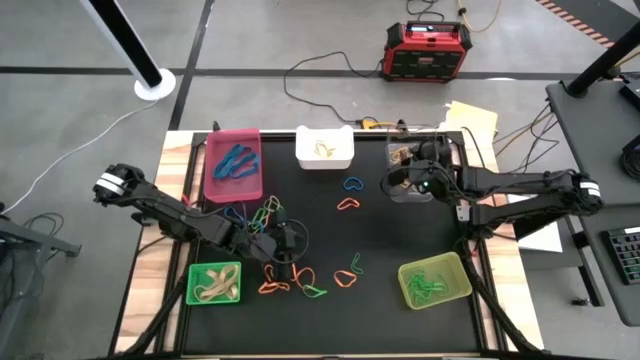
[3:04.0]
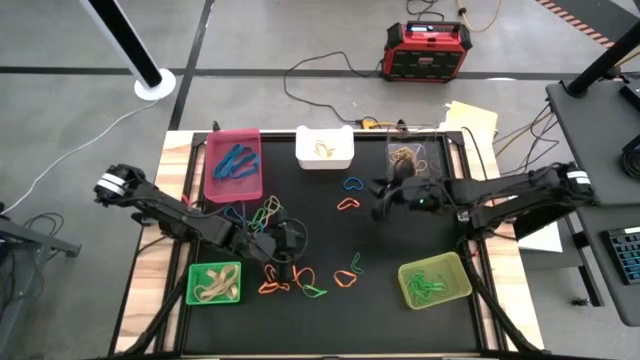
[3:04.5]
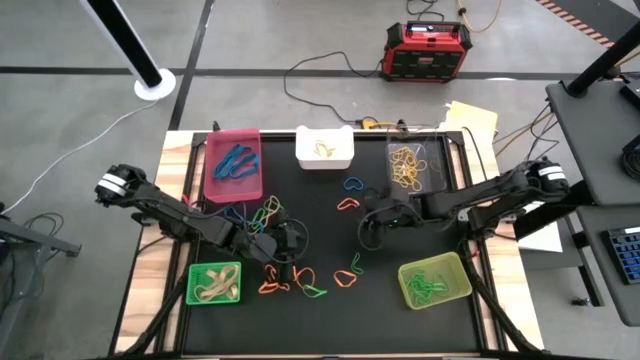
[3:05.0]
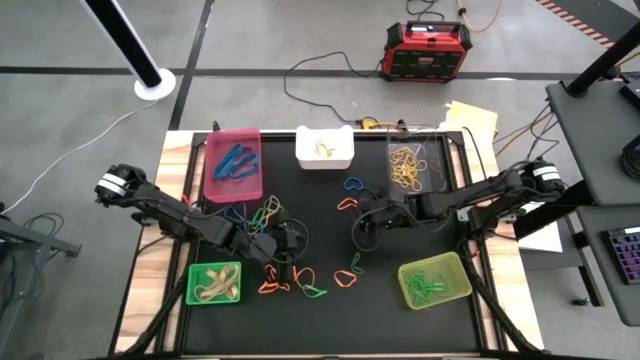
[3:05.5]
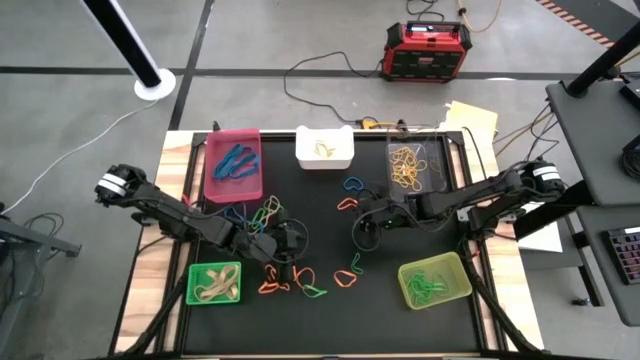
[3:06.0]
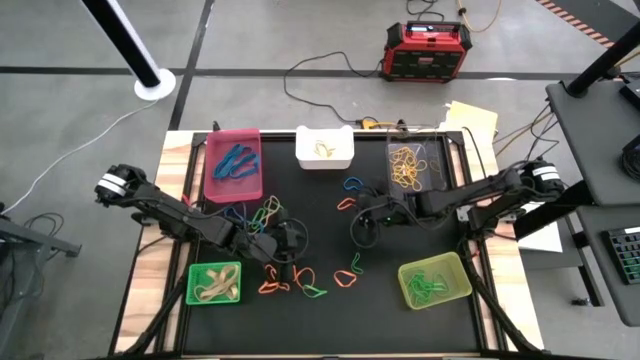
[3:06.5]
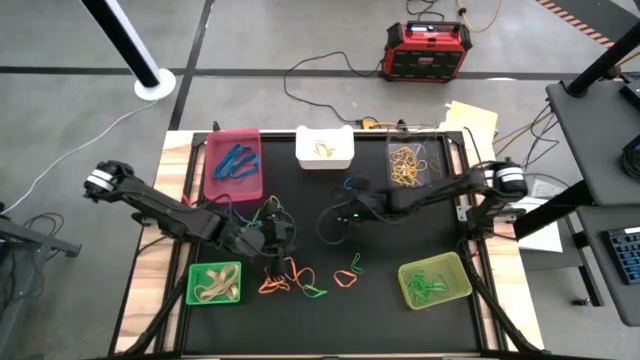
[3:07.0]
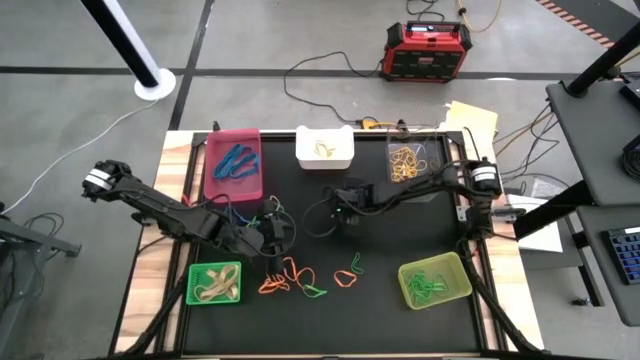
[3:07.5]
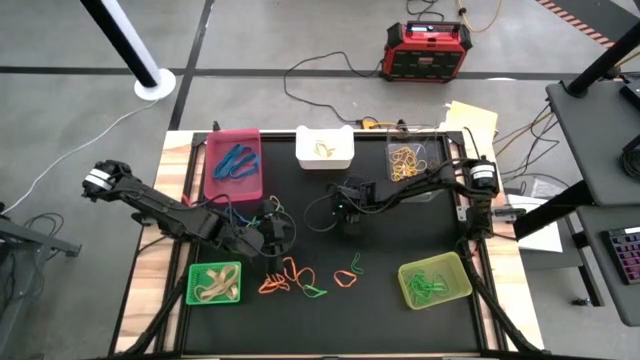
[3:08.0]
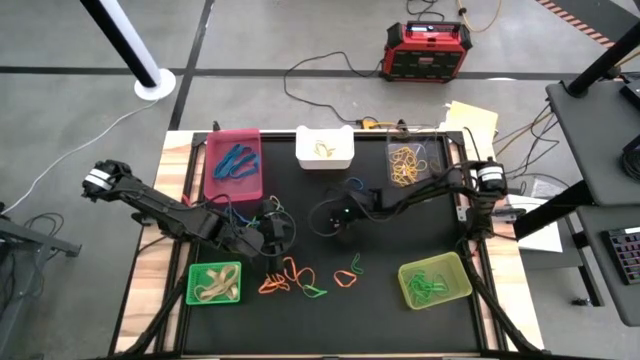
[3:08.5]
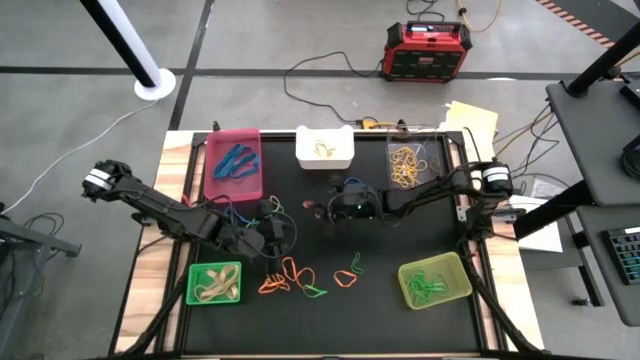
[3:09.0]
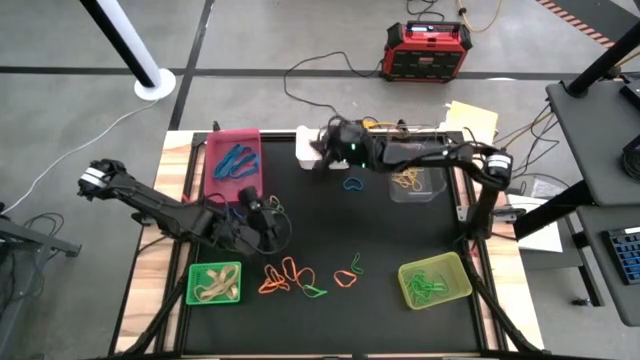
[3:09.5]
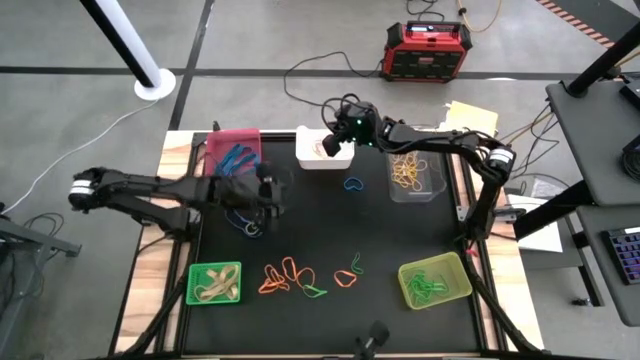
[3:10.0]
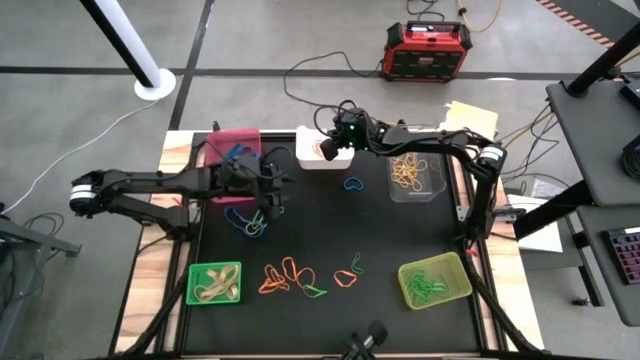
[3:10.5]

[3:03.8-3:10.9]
Task: Sort rubber bands into baskets
Put the orange rubber band into the white bin

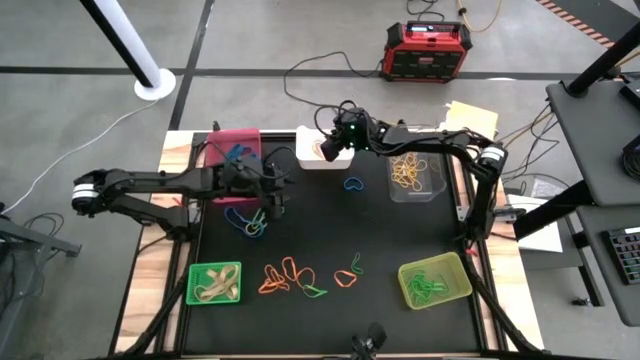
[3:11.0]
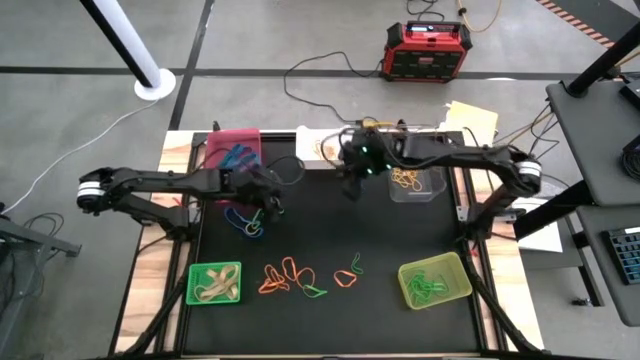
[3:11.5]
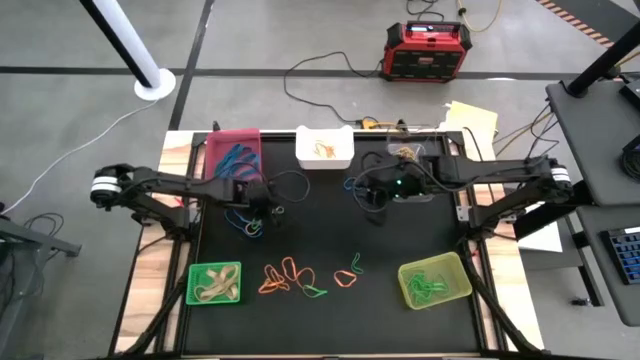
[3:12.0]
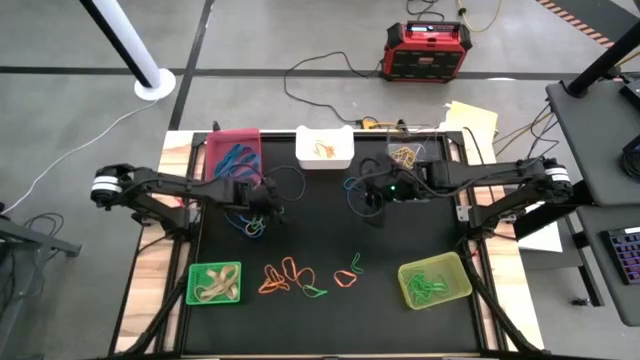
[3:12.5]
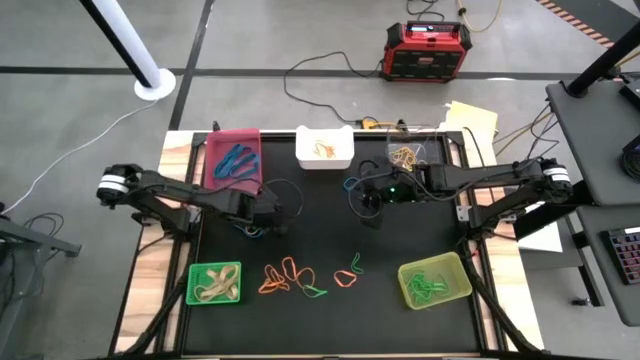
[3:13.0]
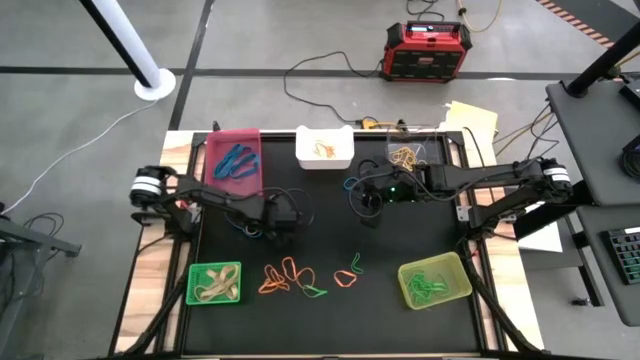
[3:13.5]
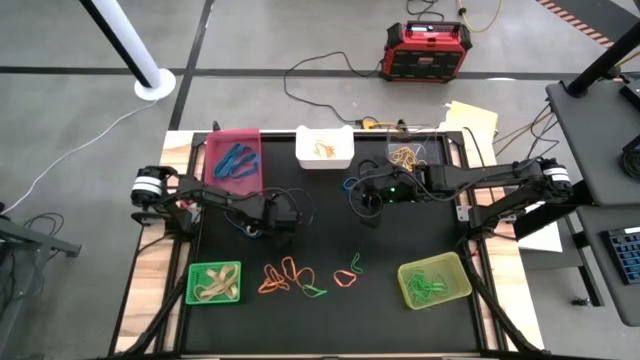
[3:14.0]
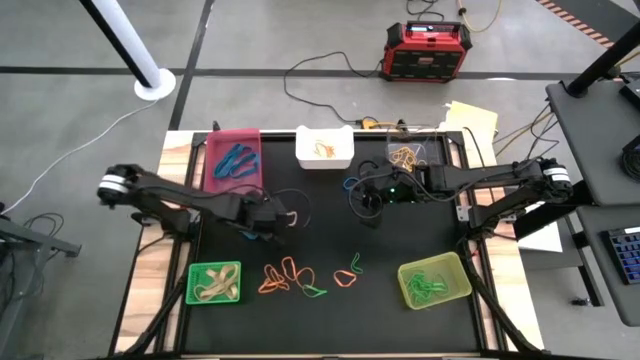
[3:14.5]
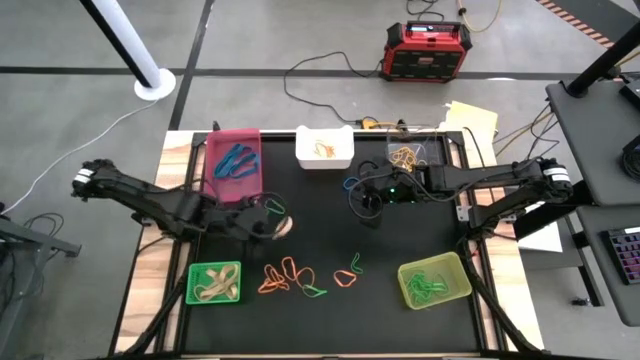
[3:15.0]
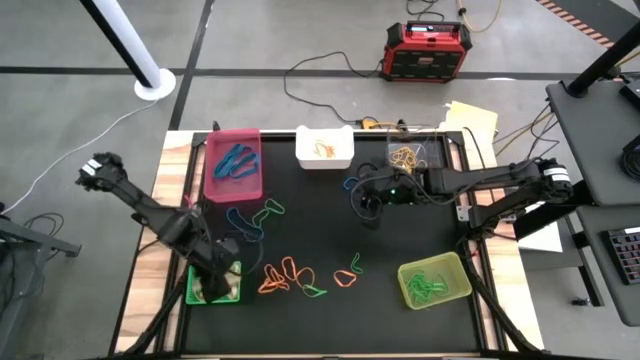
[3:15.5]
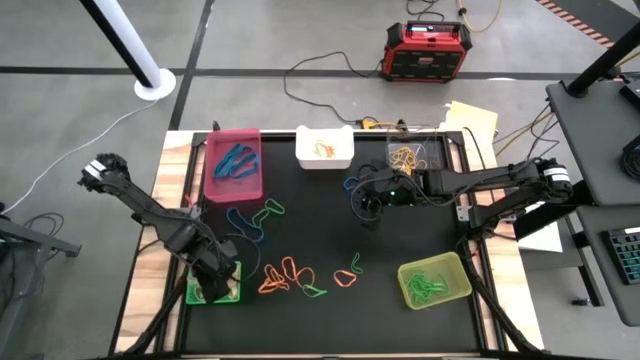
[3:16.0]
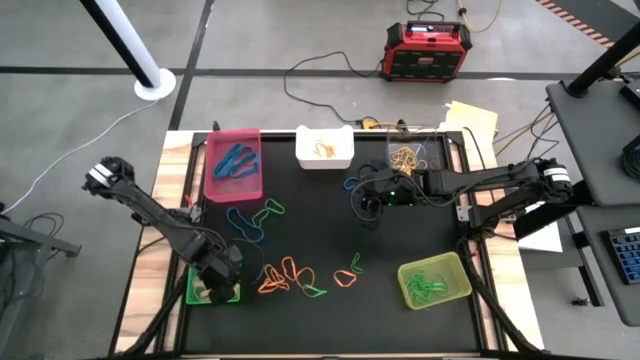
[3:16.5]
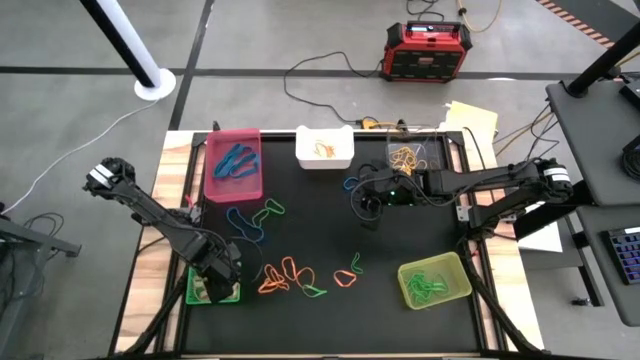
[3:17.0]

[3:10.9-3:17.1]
Put the light yellow rubber band into the green bin

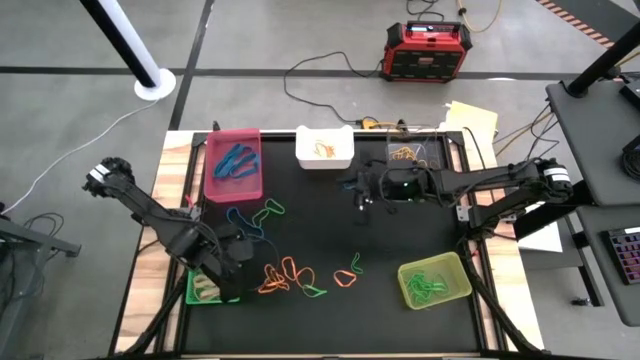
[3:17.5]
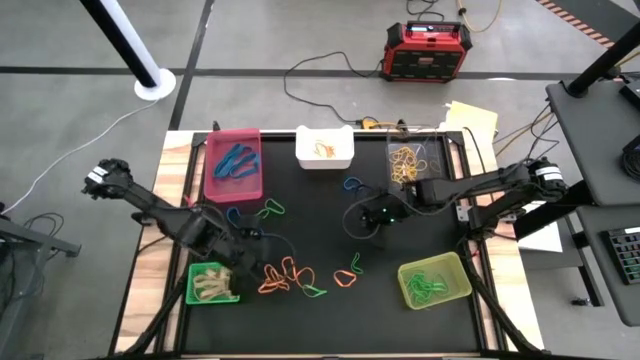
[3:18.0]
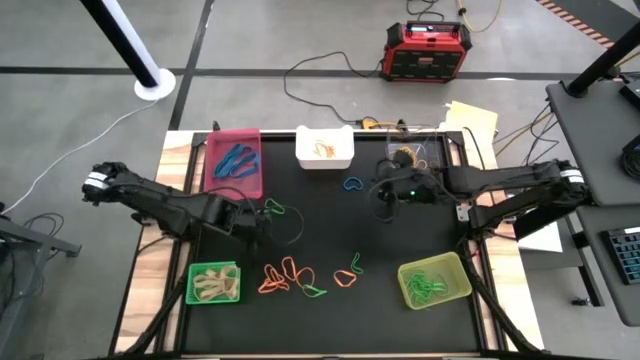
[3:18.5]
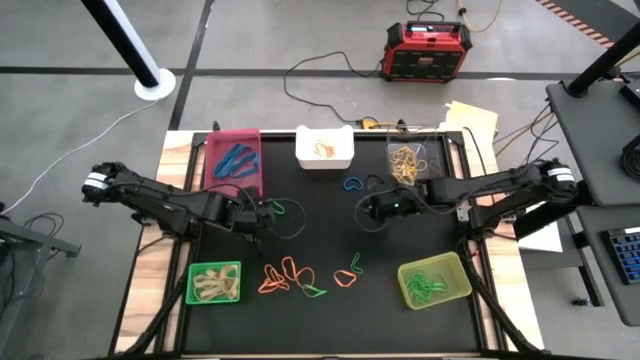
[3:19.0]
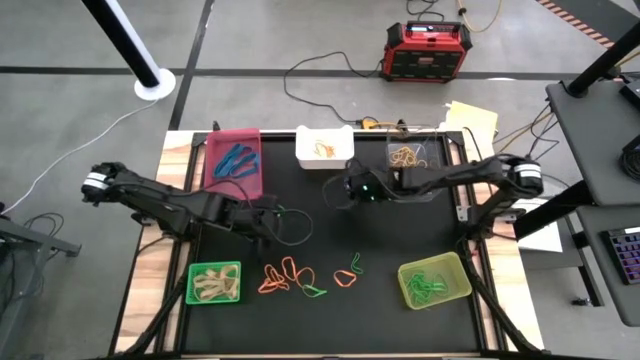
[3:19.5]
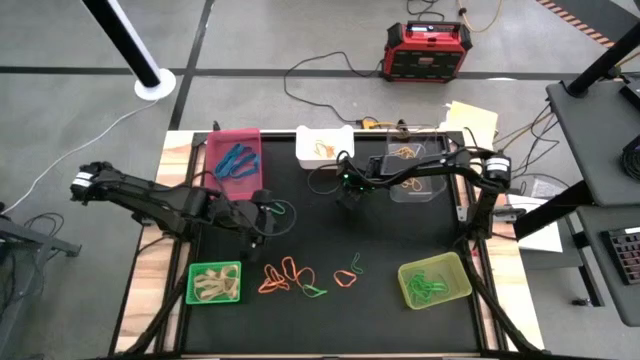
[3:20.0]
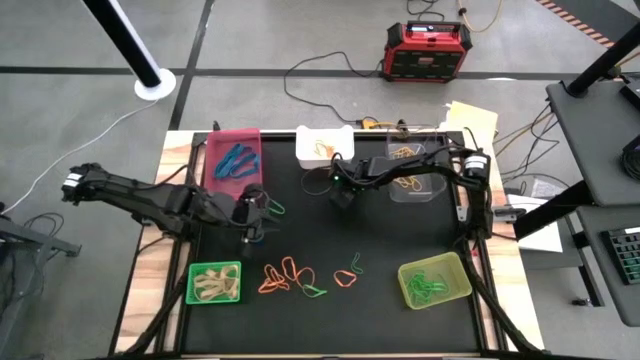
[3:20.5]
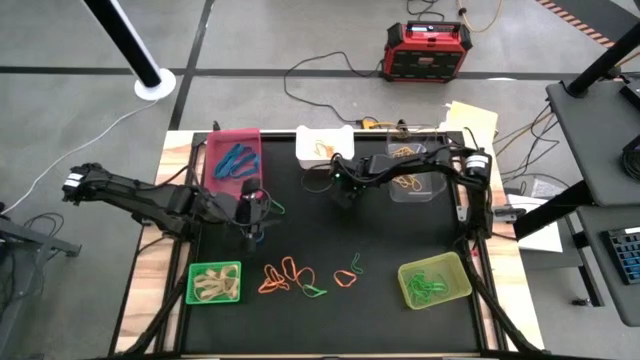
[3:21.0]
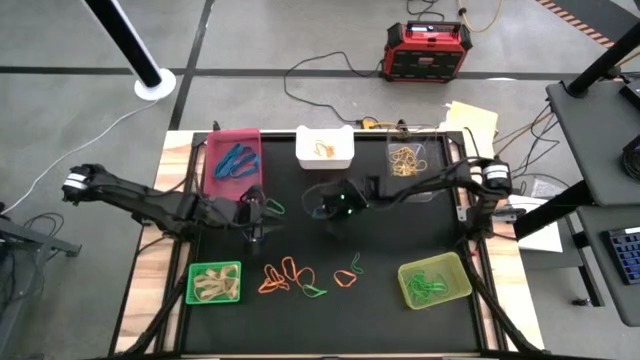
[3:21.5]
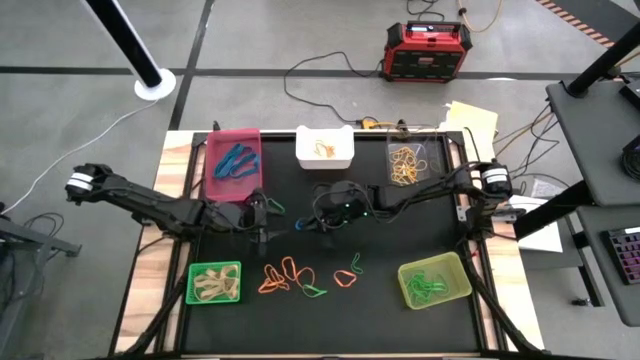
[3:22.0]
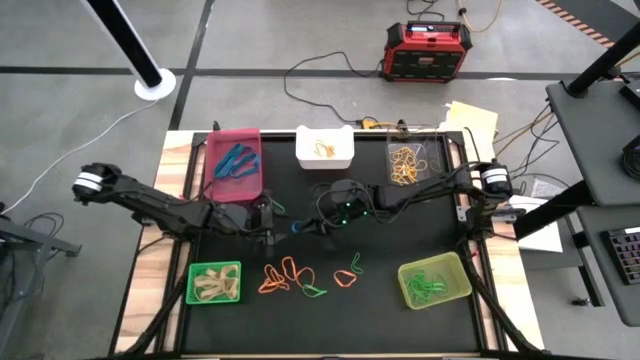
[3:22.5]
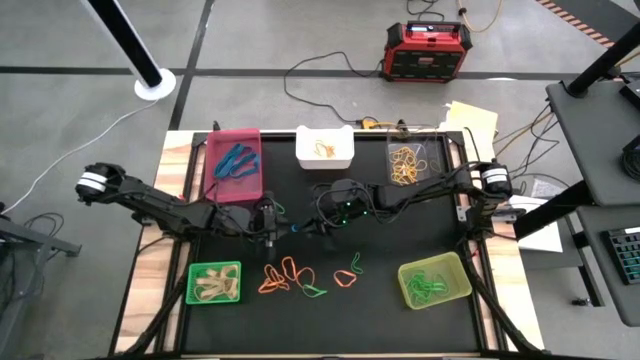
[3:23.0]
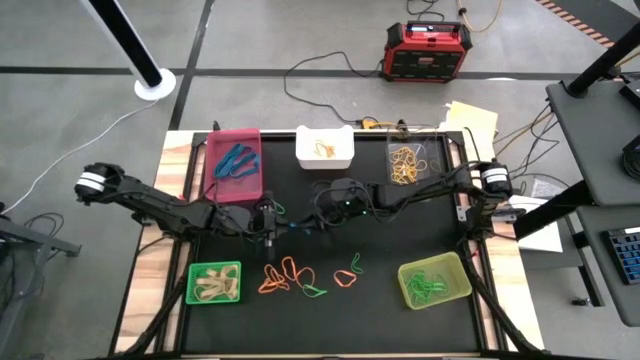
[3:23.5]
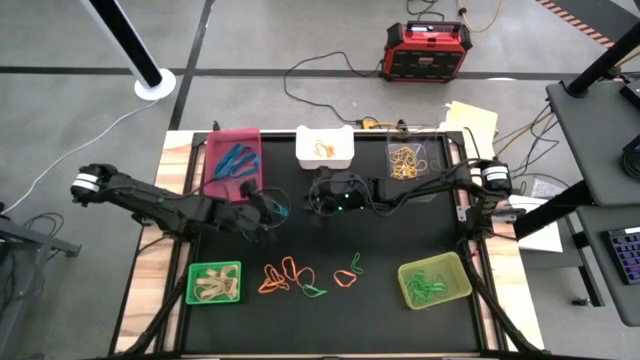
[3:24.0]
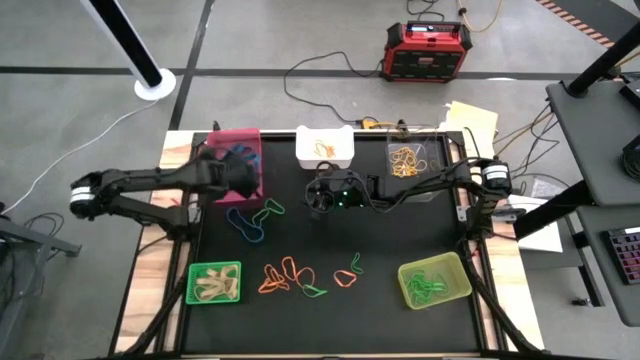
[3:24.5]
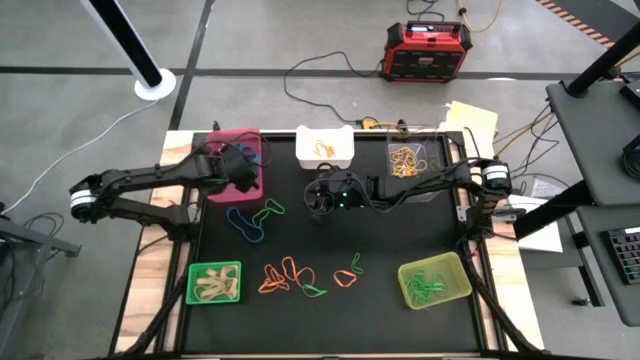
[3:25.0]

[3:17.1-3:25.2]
Put the blue rubber band into the pink bin

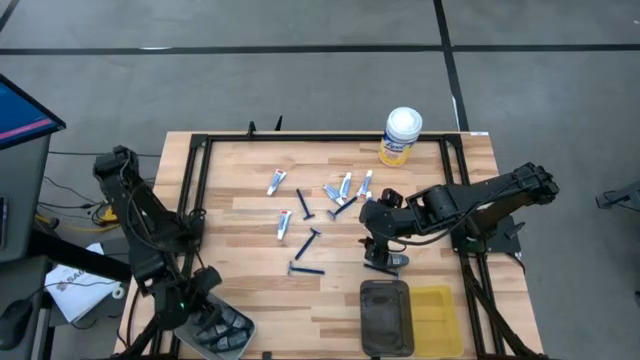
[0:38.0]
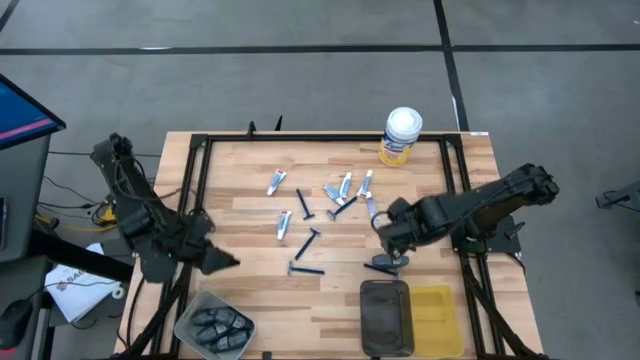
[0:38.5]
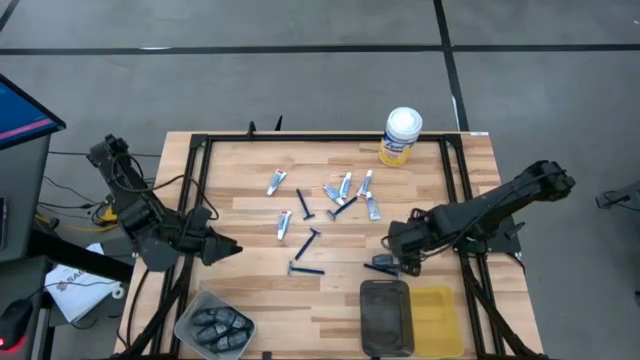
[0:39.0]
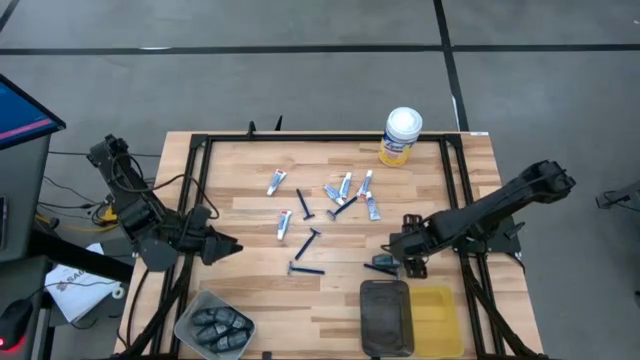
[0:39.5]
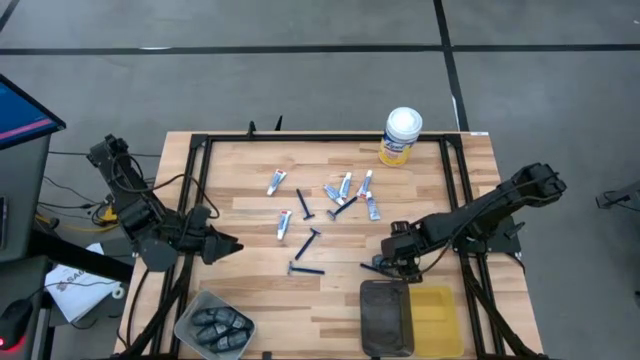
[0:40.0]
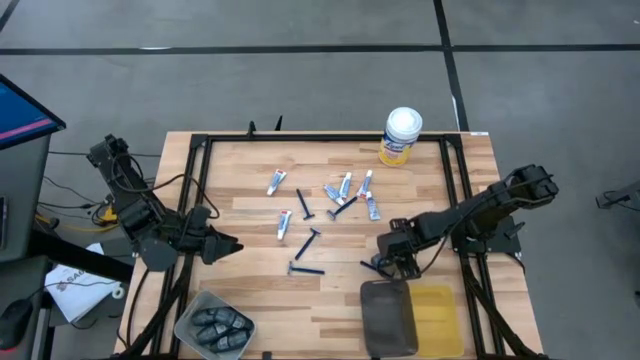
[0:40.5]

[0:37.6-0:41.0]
Task: Pick & Place Travel size toiletries
Put the deodorant into the gray bin
